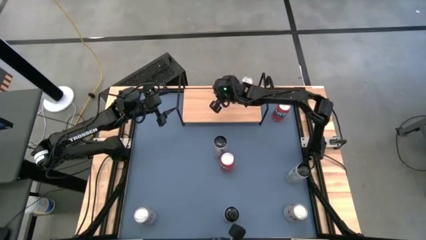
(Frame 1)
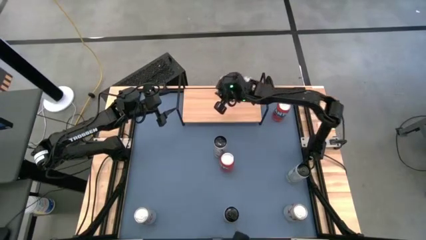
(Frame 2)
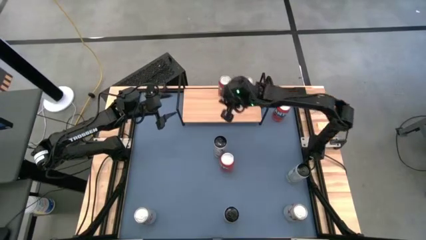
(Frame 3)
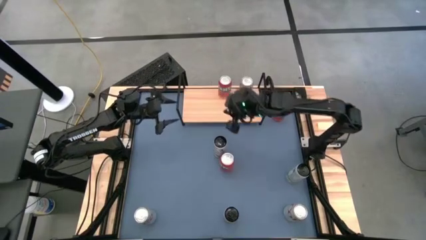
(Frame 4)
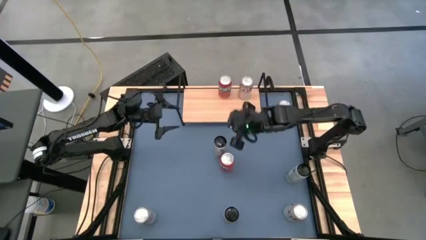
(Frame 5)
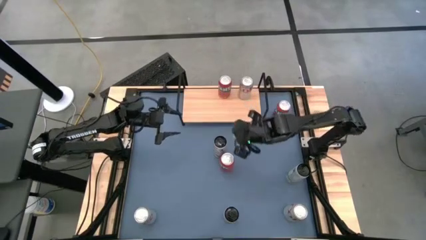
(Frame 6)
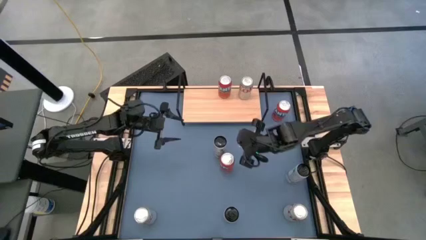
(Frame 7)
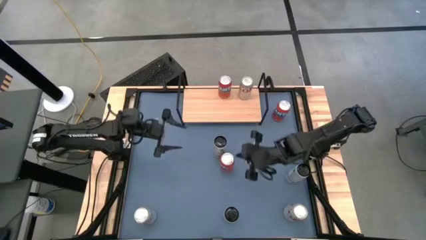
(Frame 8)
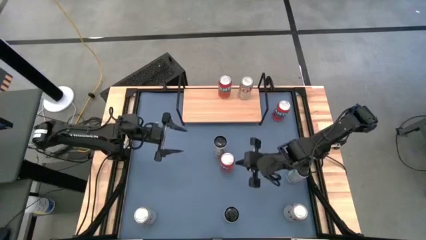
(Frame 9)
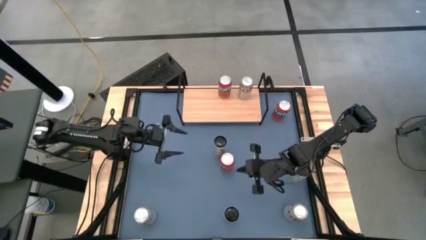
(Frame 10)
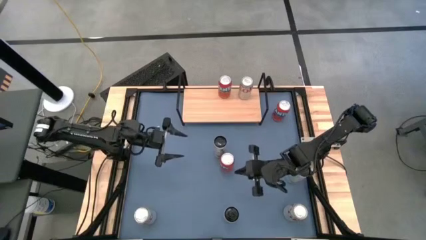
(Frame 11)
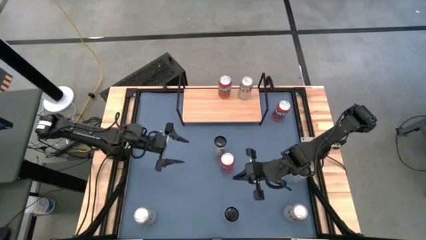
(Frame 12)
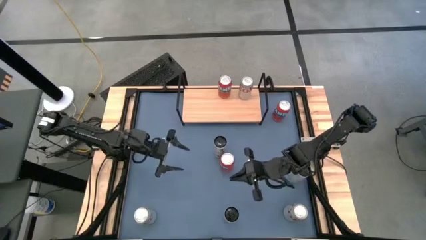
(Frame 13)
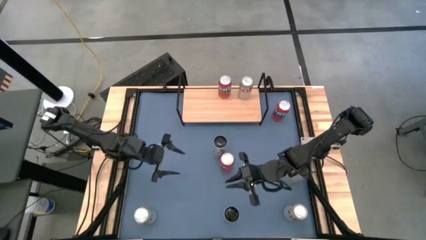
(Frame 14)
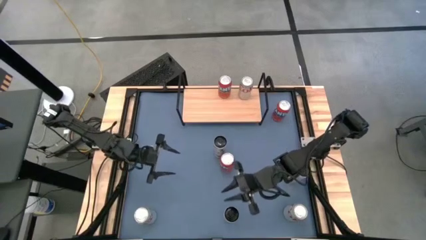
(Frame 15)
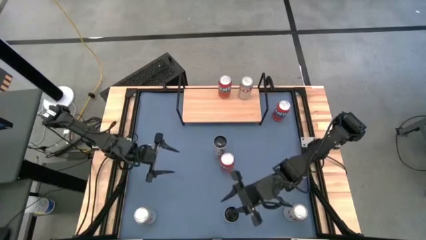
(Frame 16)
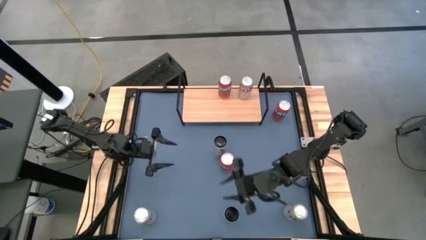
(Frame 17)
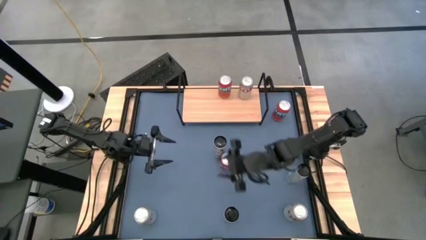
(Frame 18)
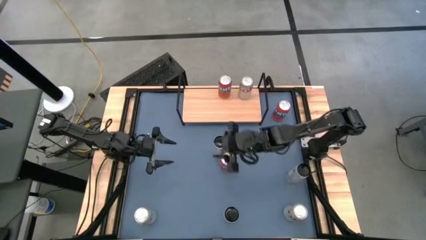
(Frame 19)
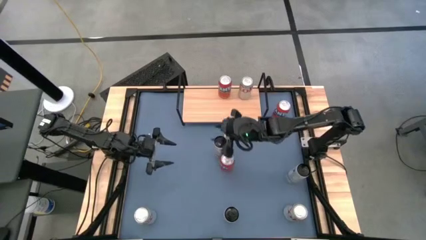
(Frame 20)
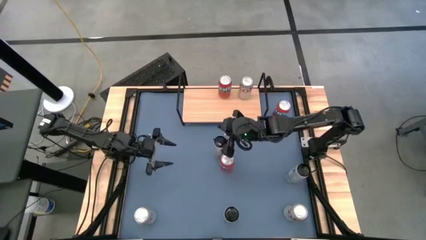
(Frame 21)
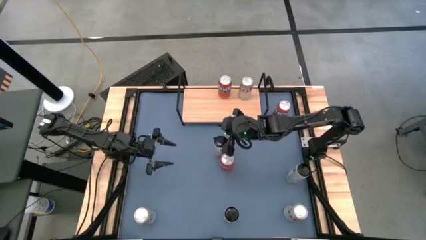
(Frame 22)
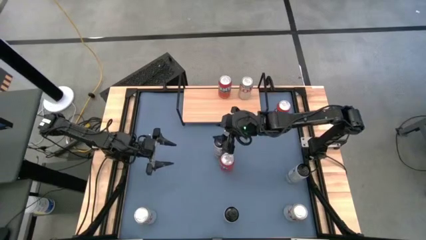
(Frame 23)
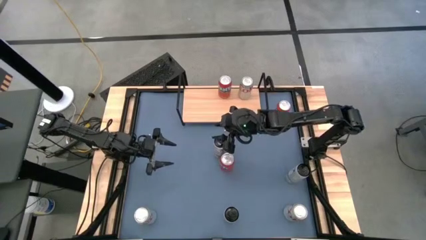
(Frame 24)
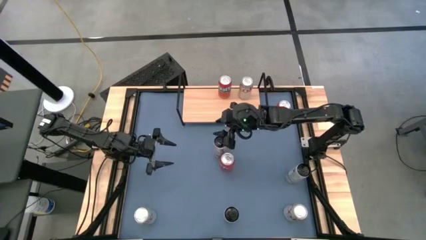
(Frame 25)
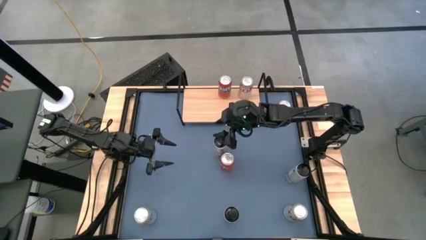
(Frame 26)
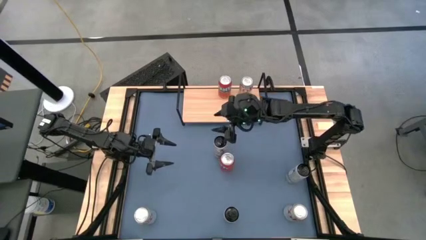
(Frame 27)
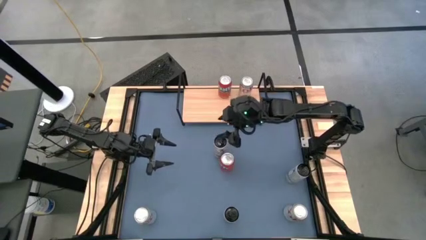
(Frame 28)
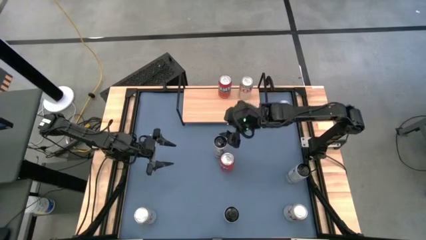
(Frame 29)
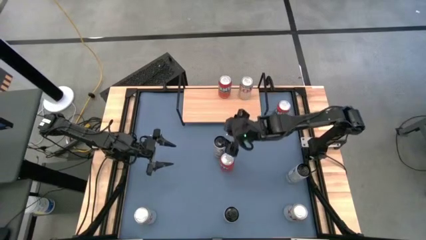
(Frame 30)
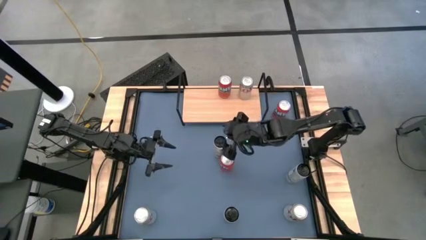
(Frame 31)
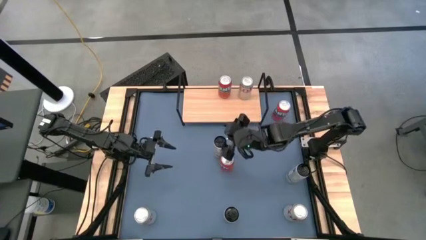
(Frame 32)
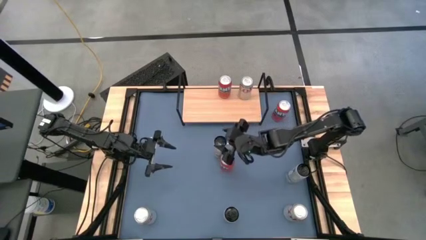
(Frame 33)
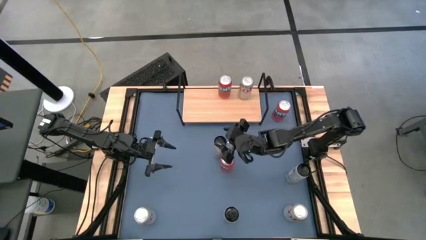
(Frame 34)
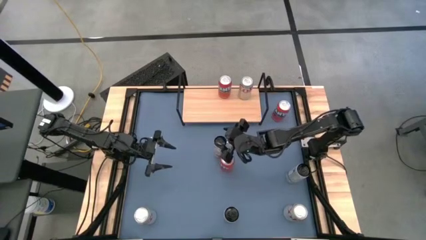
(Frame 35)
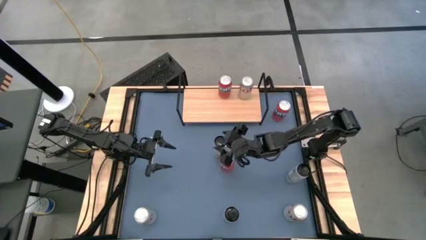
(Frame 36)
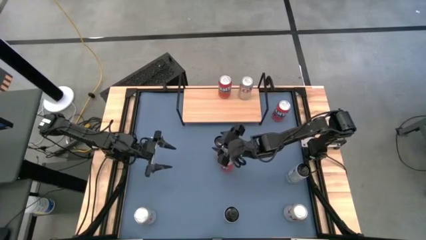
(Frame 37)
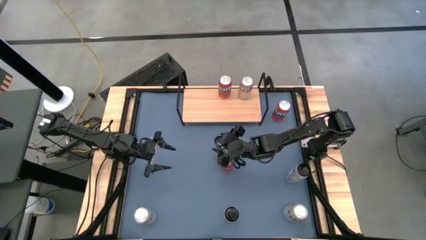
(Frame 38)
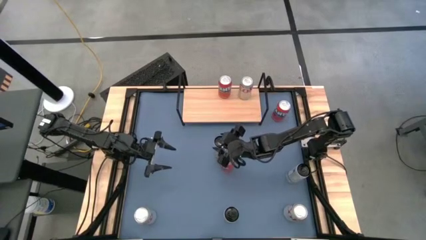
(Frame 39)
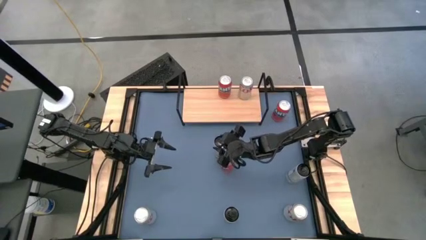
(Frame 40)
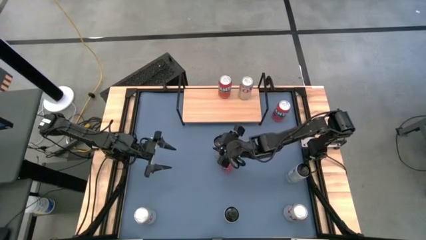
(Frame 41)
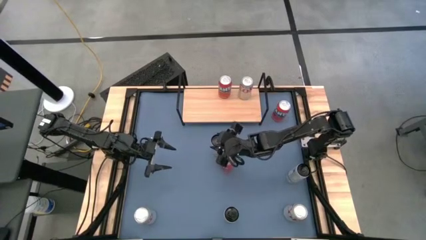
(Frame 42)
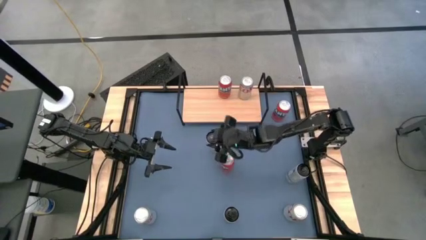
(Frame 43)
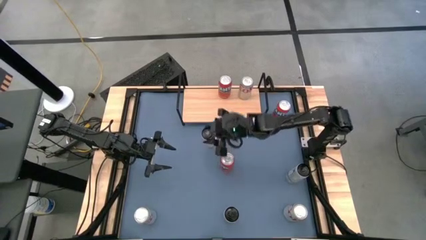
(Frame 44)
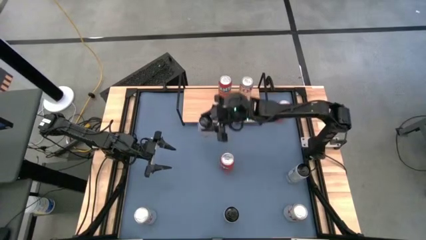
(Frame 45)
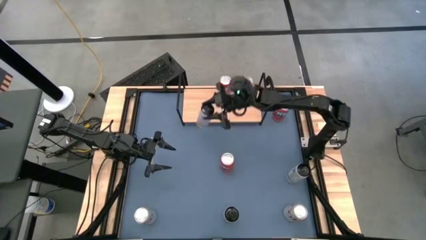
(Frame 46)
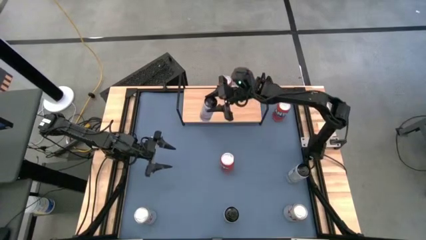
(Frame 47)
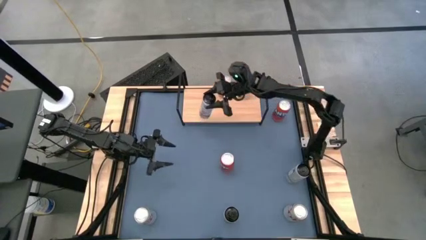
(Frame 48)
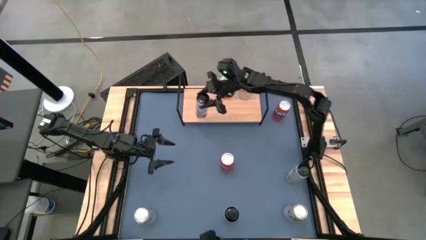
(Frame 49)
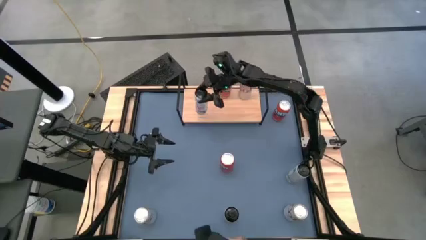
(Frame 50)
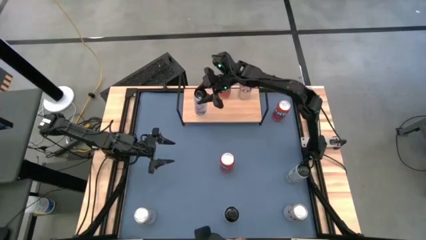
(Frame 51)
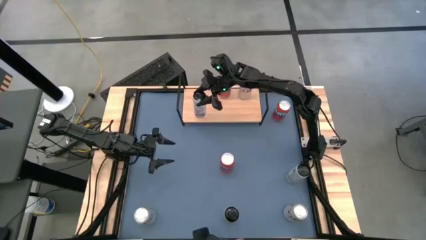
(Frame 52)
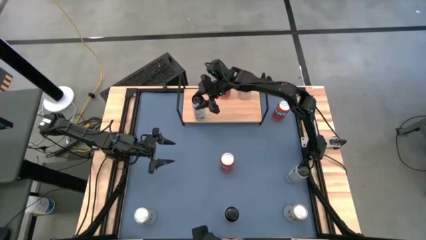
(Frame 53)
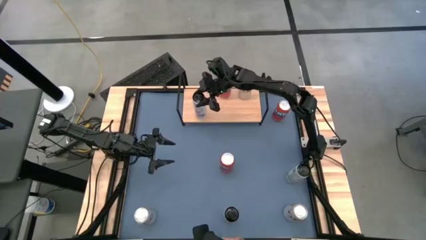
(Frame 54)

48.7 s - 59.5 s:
Task: Place canned beverage on shelf
Put the top left black soda can on the shelf

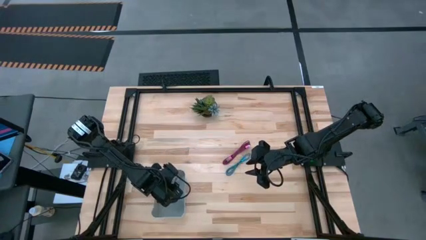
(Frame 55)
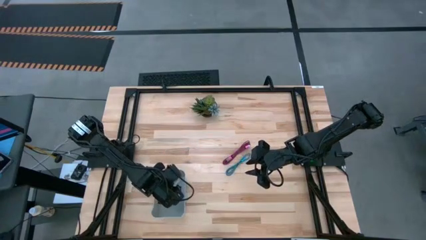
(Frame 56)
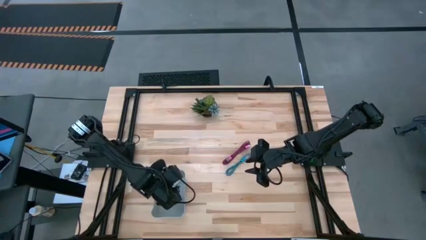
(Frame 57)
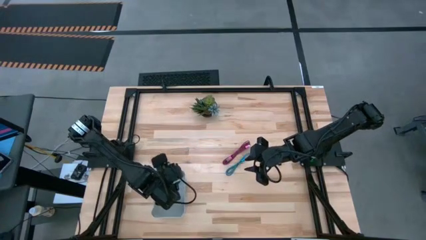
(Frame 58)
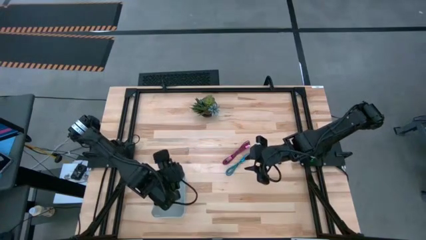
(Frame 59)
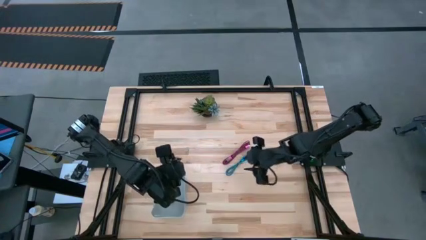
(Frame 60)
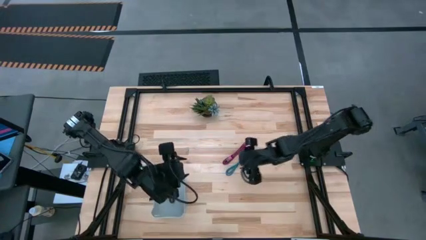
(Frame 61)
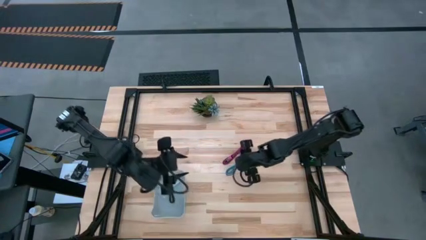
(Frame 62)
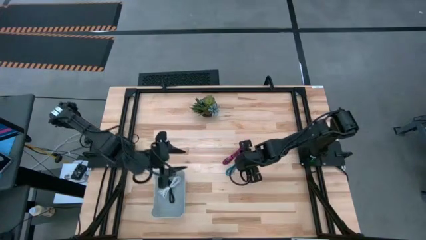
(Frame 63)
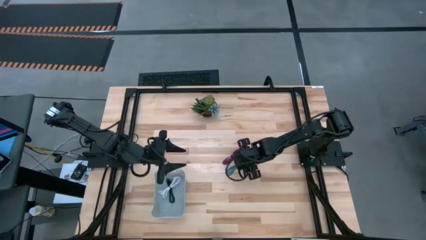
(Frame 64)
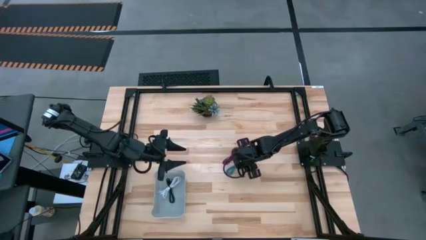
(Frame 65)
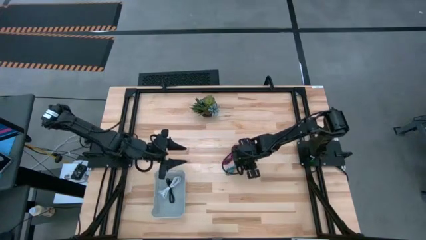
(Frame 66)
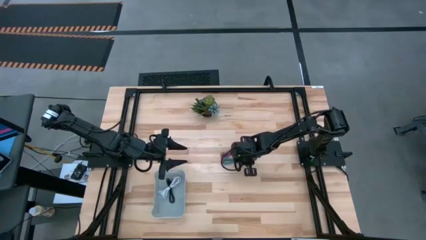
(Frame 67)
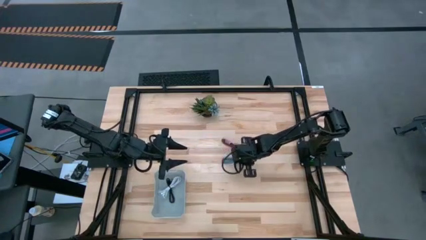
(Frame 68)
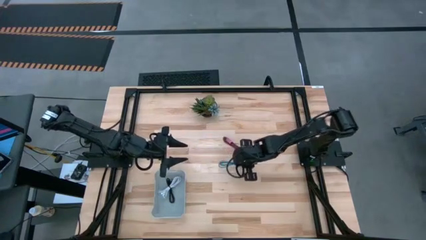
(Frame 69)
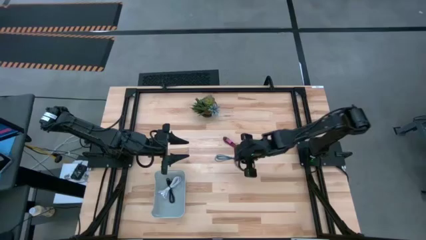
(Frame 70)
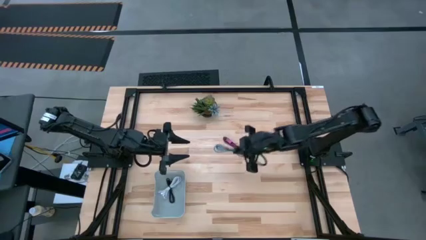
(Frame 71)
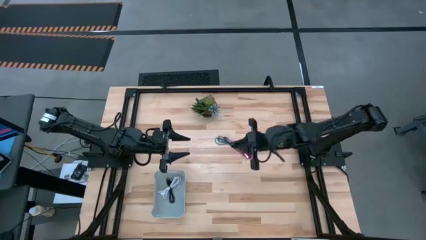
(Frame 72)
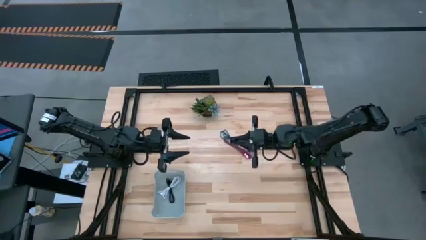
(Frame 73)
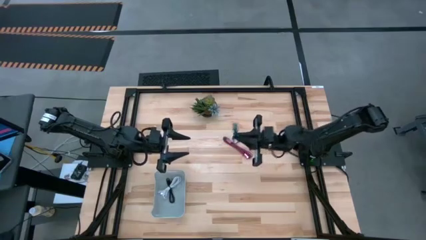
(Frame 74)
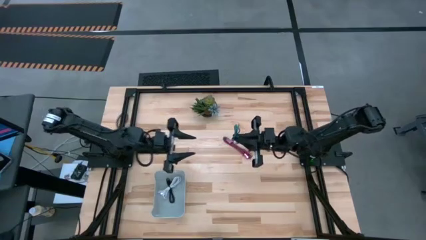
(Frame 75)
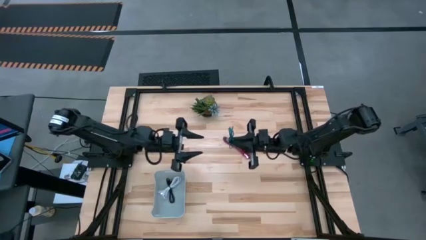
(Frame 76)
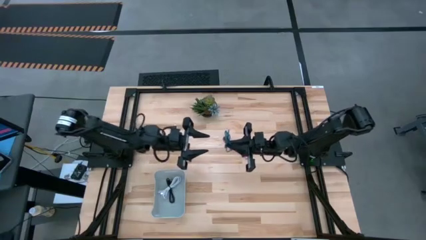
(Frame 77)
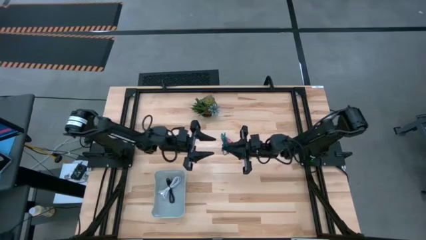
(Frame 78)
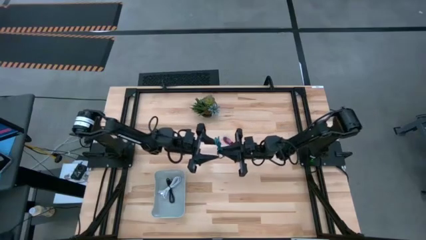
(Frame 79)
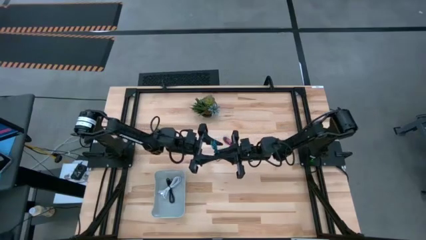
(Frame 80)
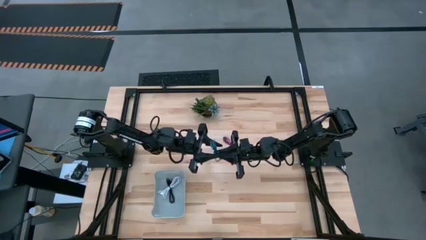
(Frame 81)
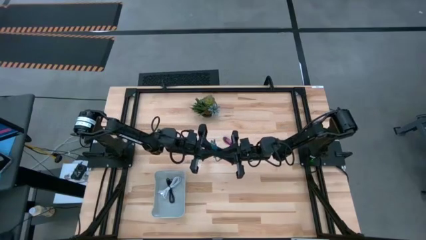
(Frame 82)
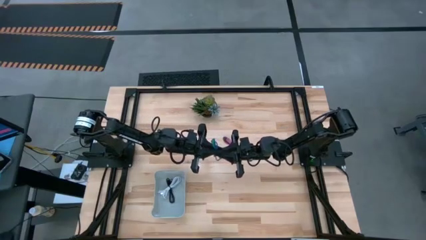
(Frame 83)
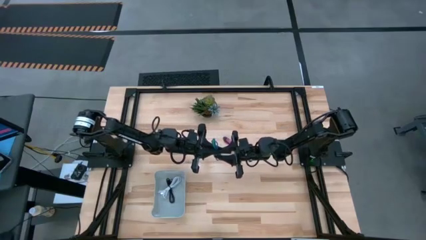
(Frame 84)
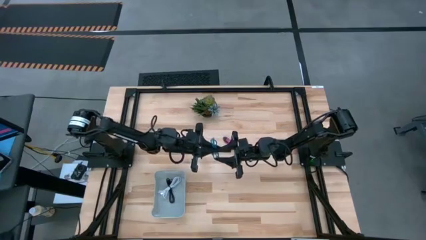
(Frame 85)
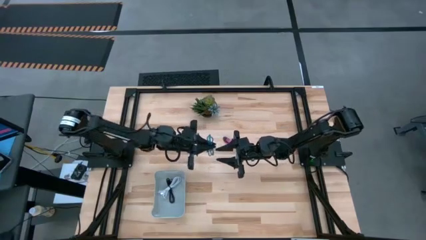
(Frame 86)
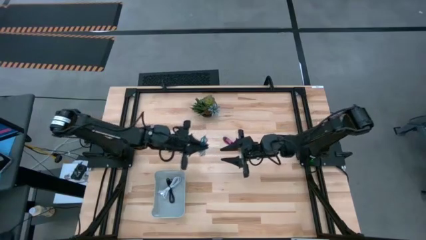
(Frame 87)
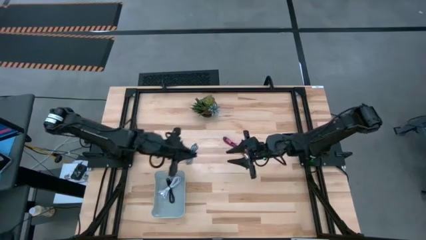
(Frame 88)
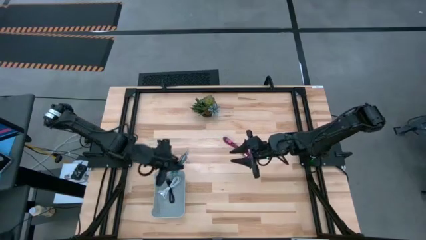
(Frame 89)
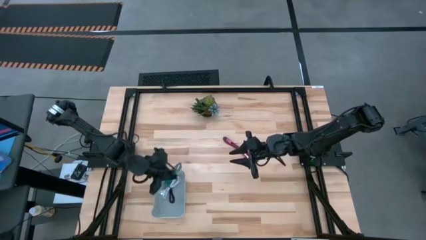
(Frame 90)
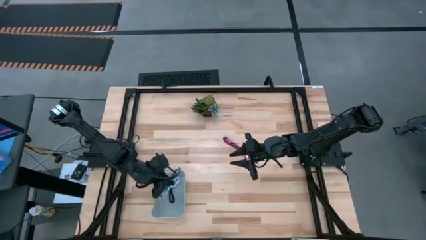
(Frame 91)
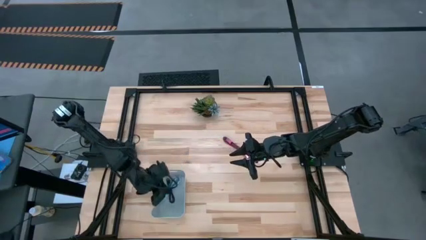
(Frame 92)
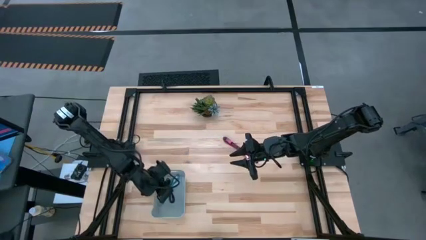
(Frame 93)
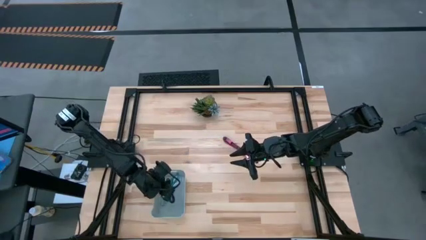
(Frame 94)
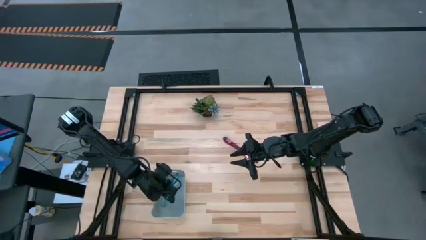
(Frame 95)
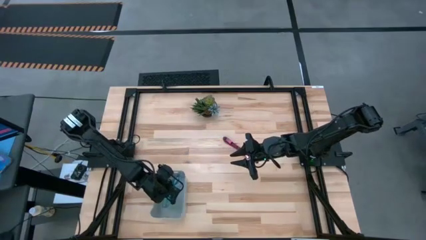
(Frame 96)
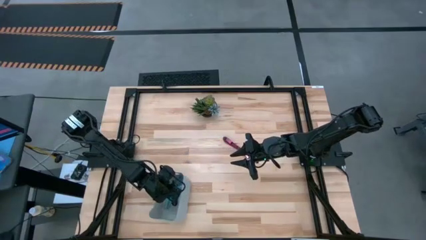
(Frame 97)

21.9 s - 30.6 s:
Task: Pick and place USB-C Cables
Put the blue USB cable into the gray bin
